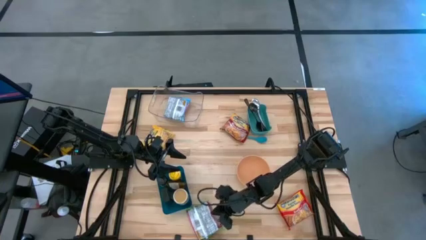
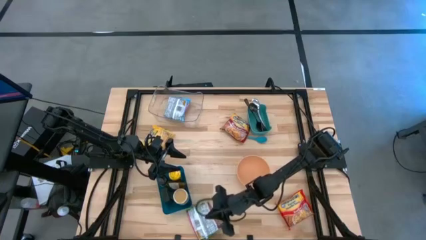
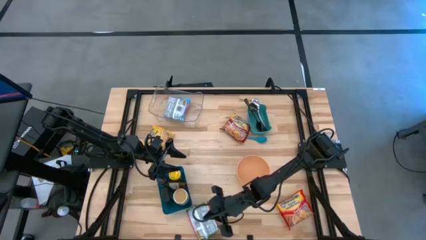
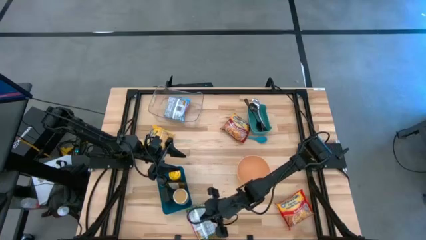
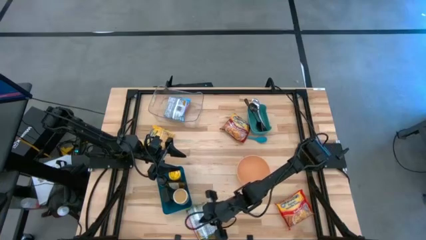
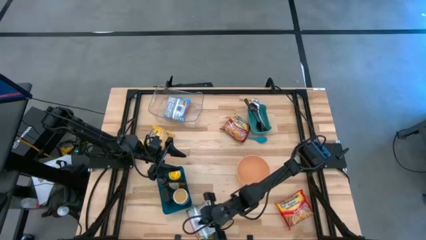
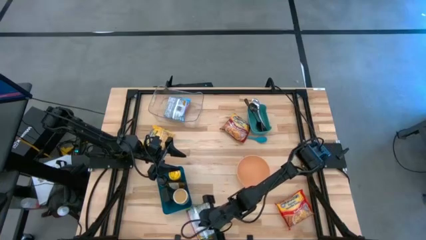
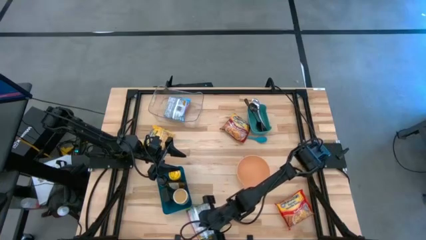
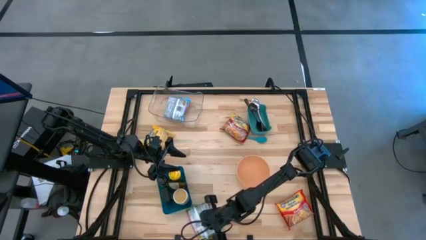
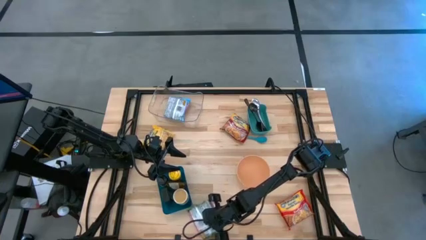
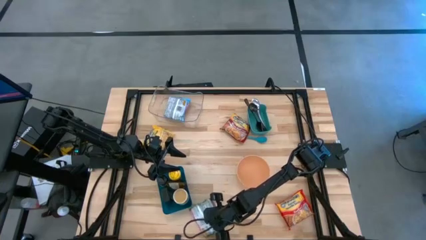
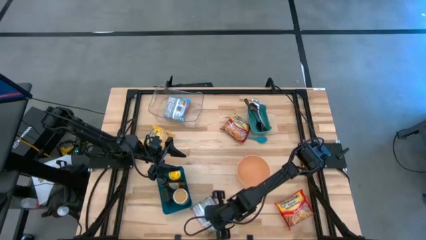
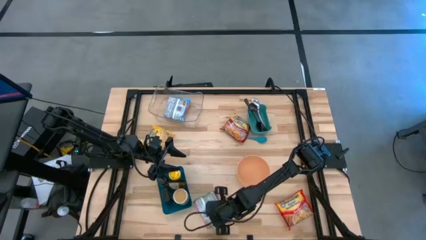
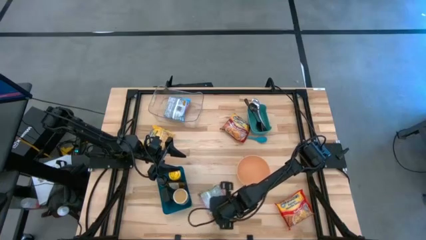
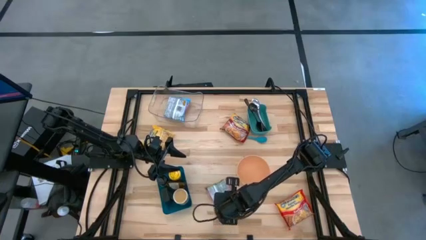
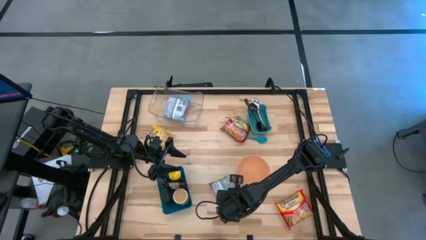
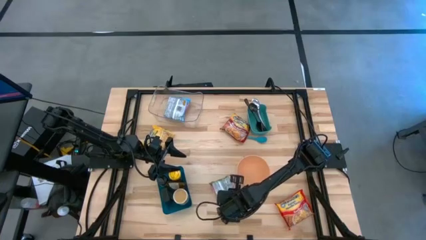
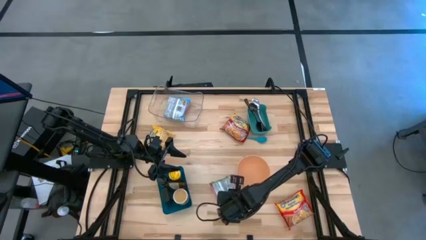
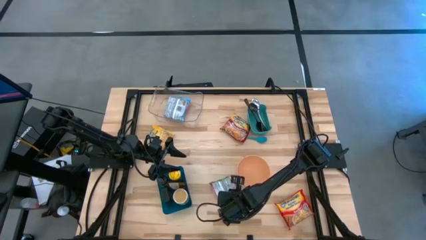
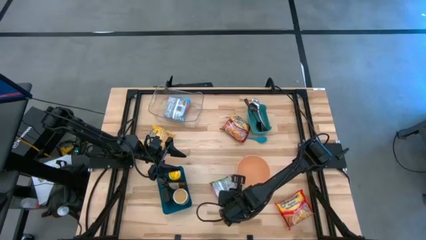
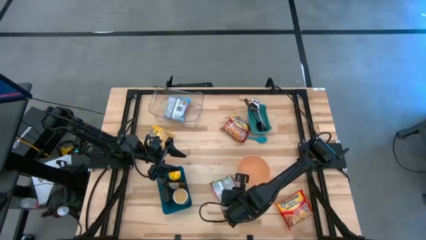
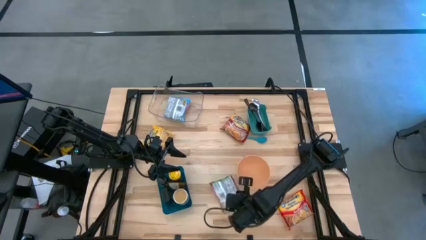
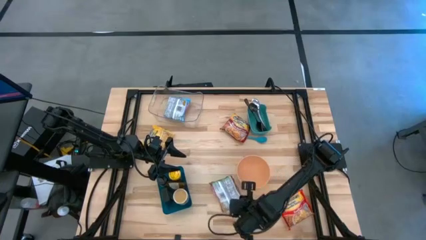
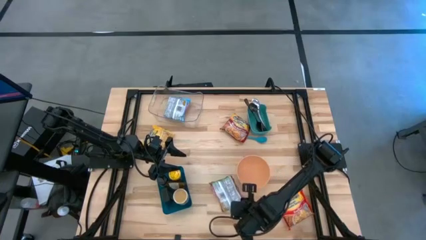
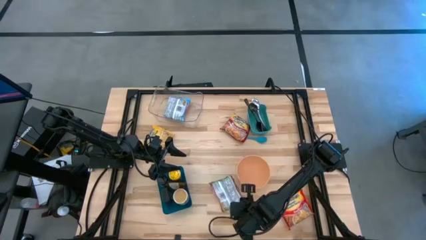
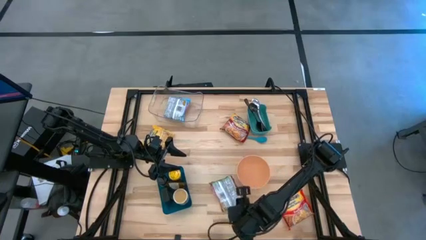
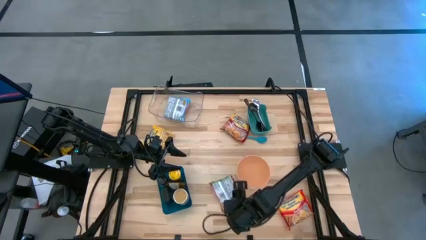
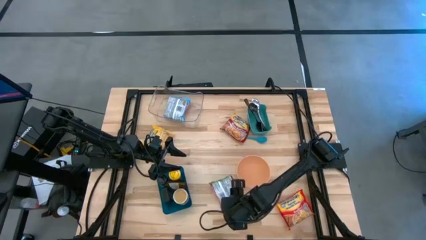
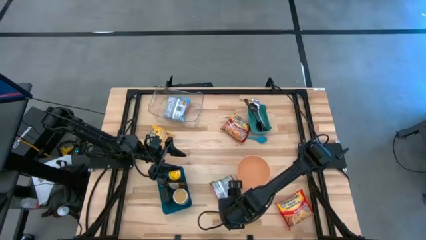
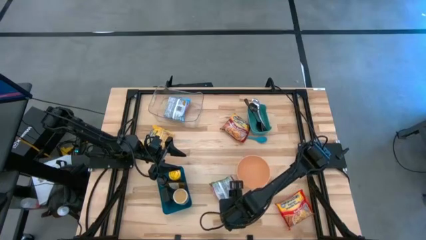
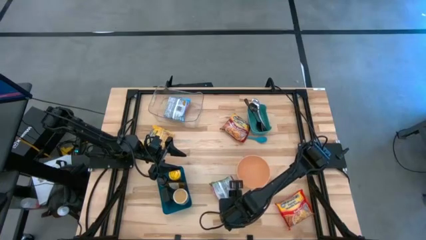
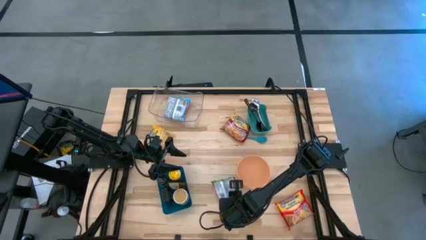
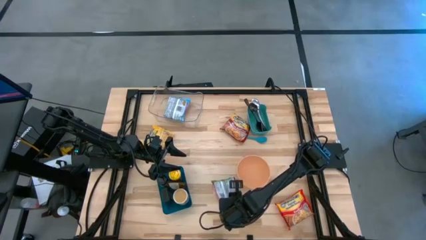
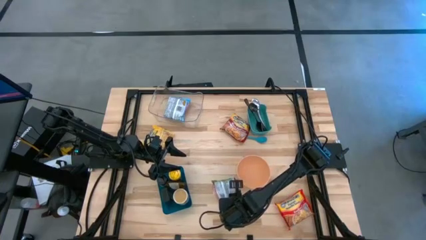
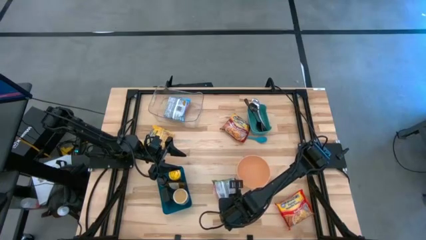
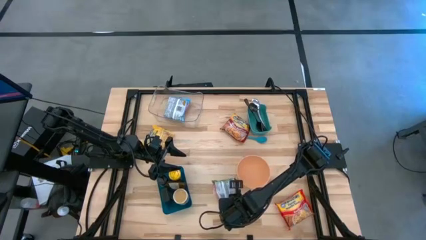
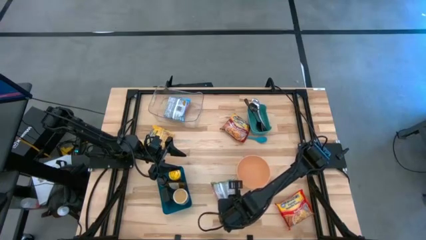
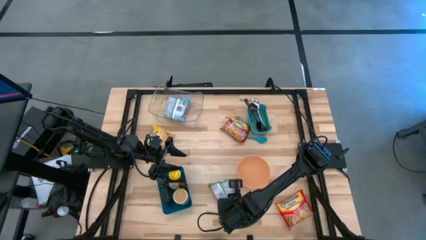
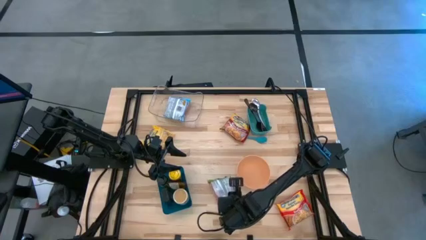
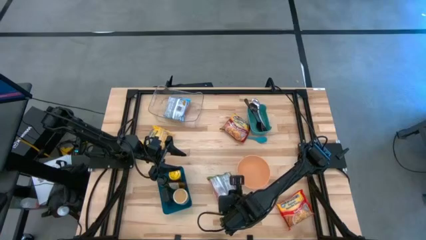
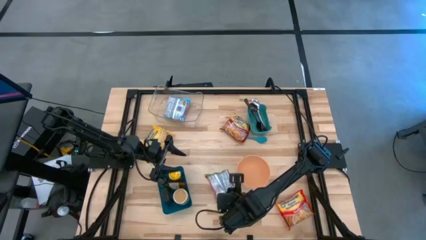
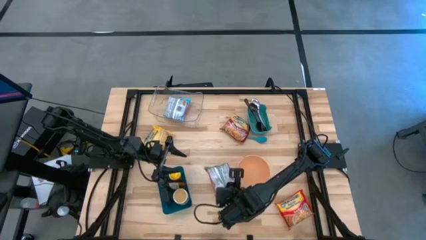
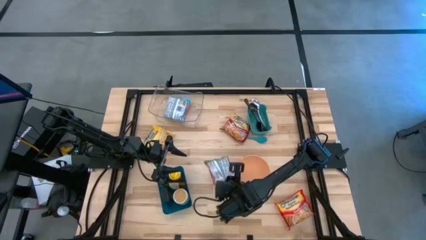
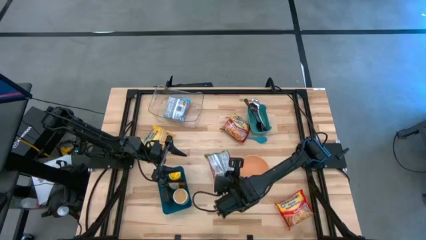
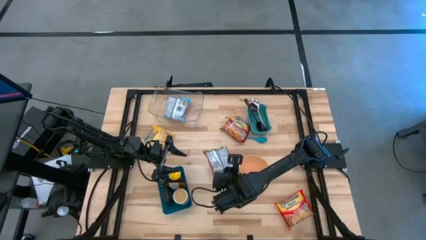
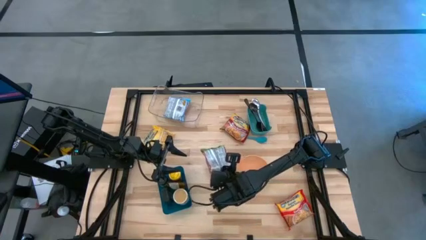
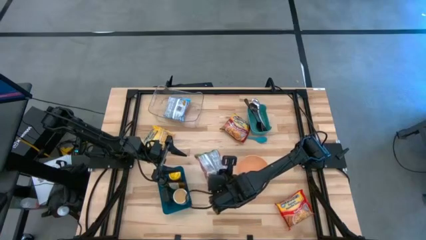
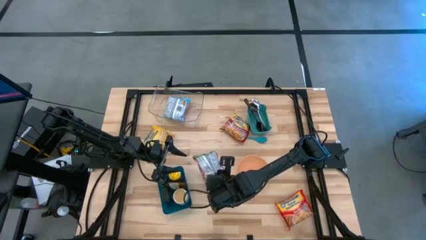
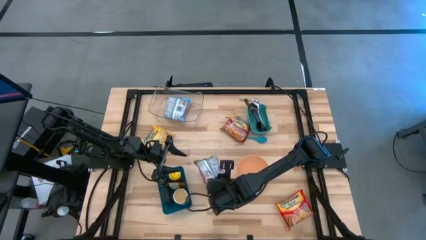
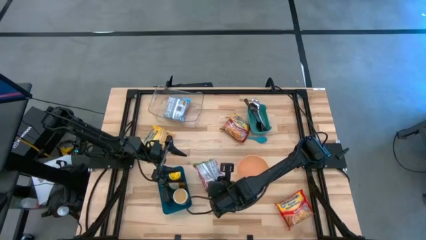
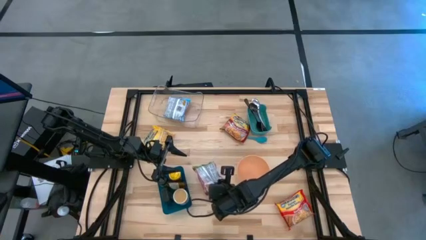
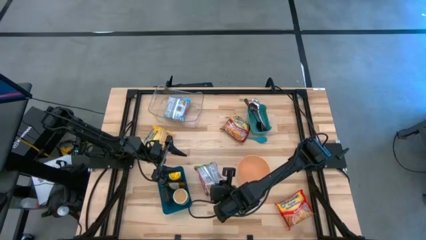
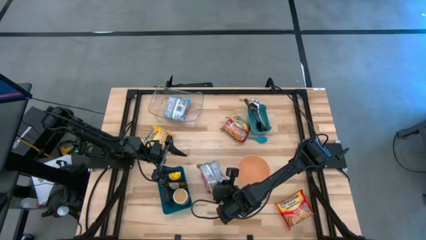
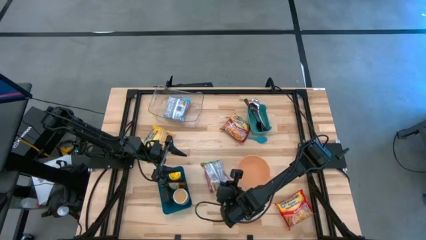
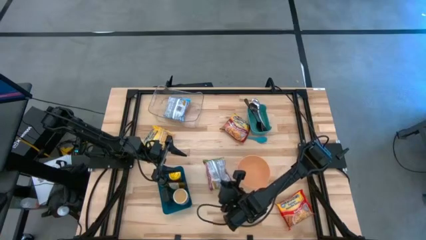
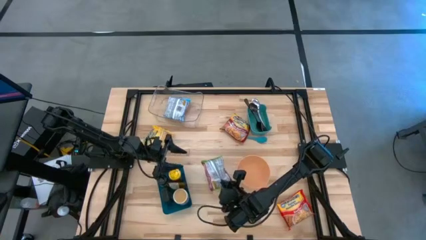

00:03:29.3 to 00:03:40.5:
Task: Pick & Place Food Item
Put the green noodle pack into the transparent bin

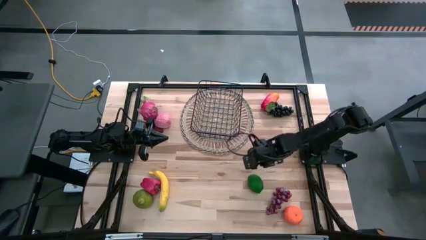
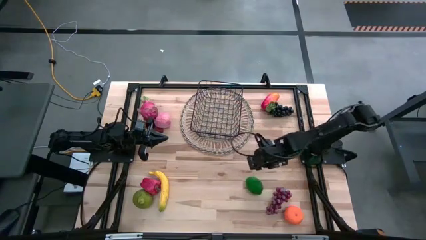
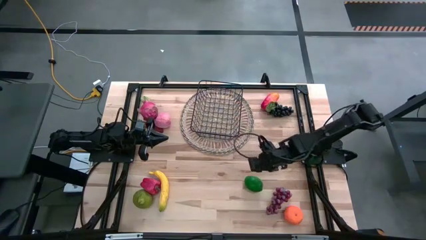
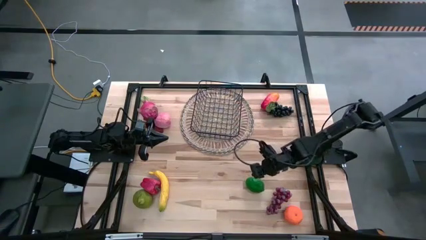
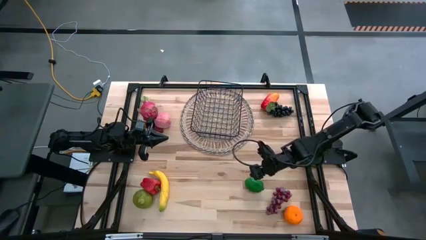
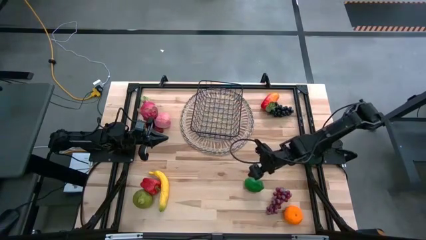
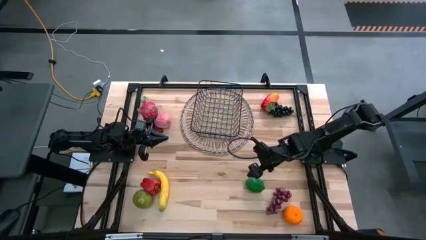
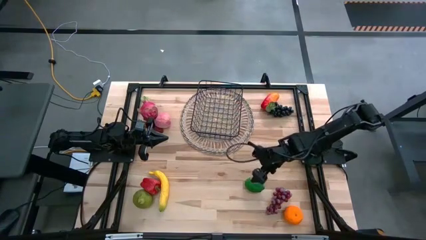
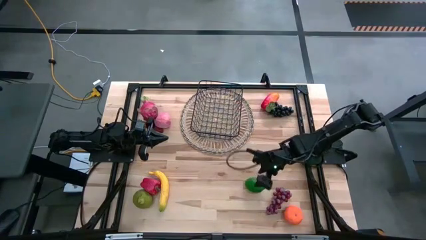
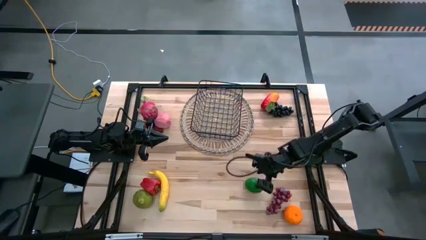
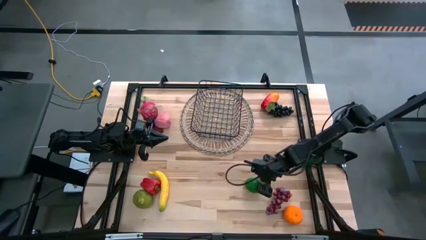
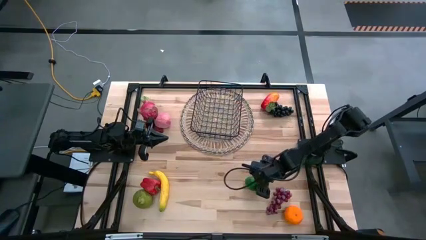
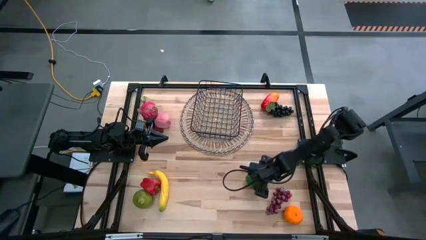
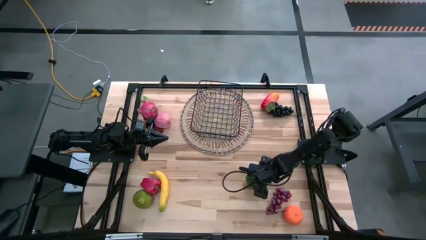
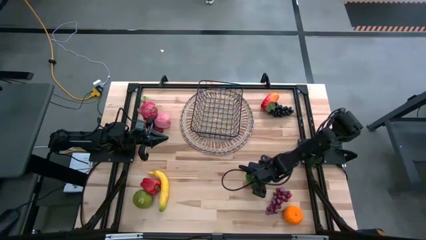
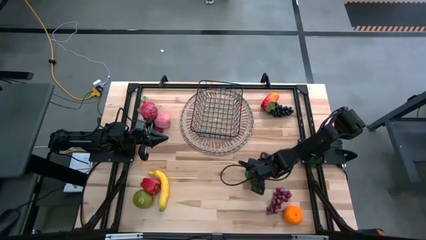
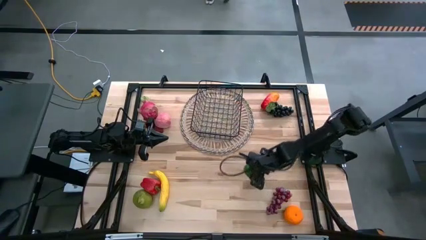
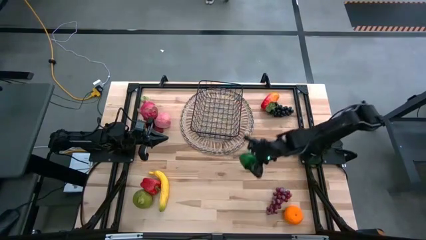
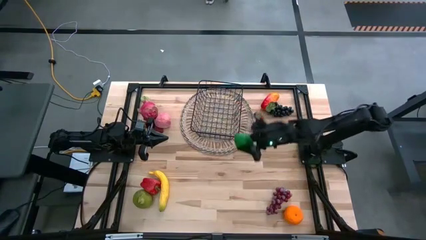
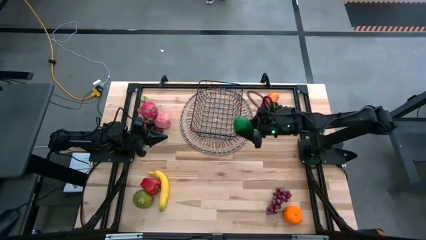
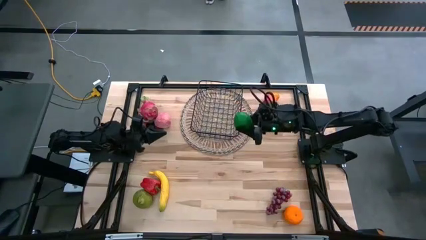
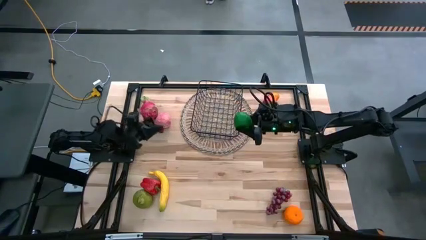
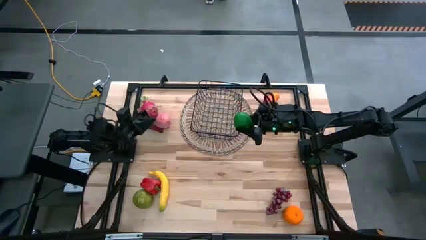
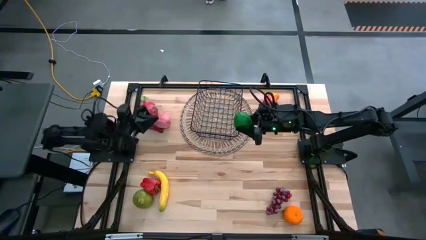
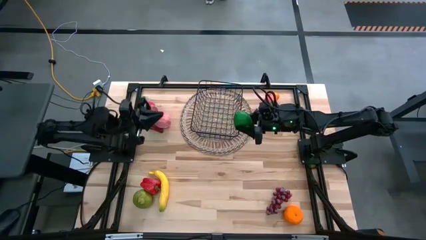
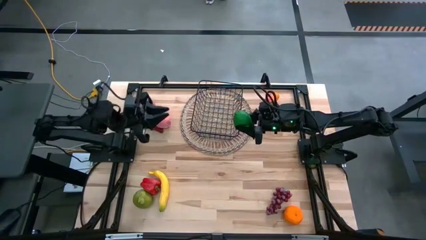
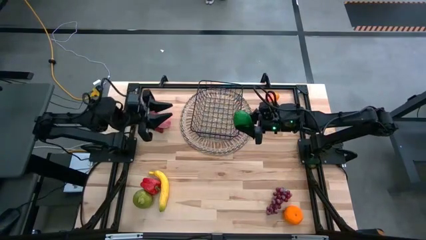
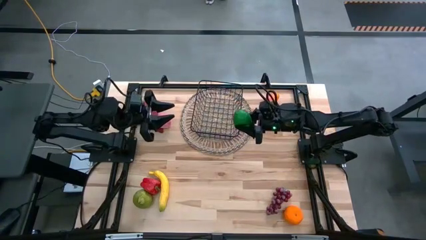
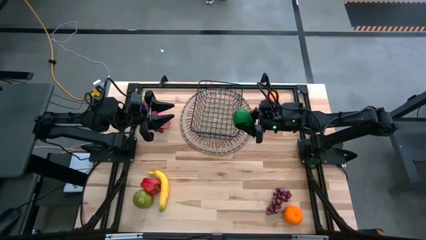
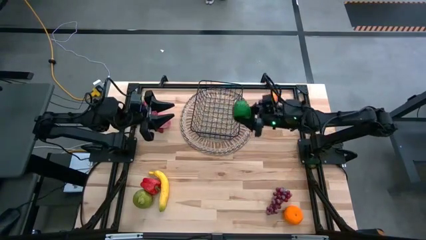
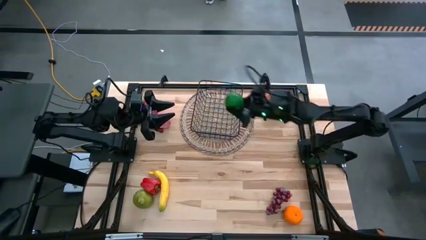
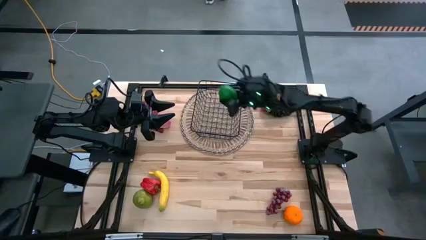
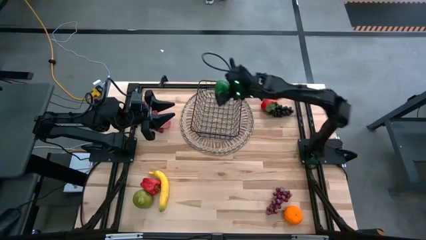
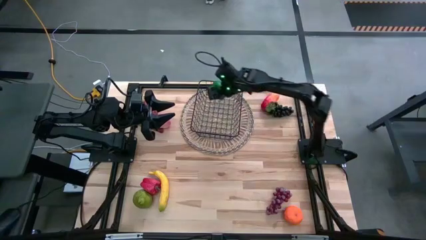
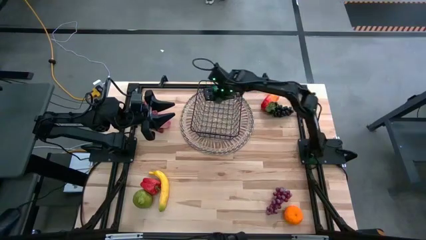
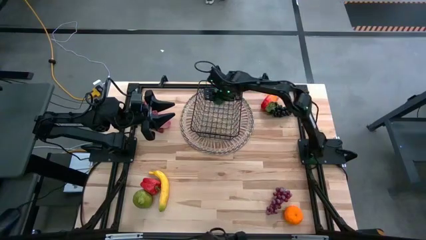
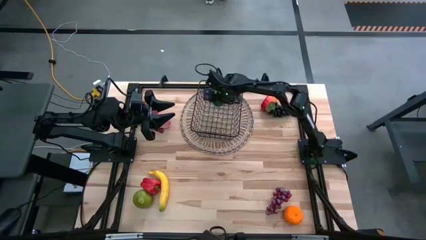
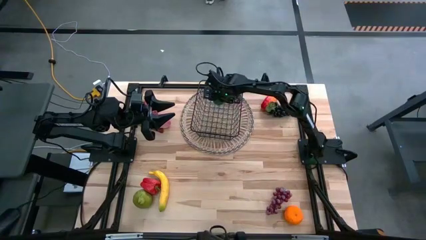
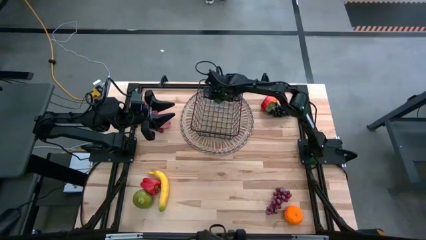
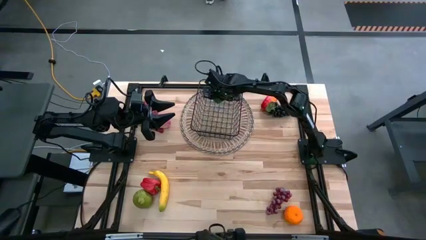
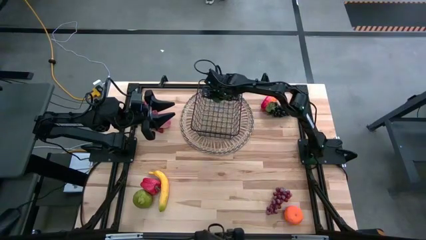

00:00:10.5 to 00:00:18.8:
Task: Build produce basket
Put the green lime into the black wire basket
